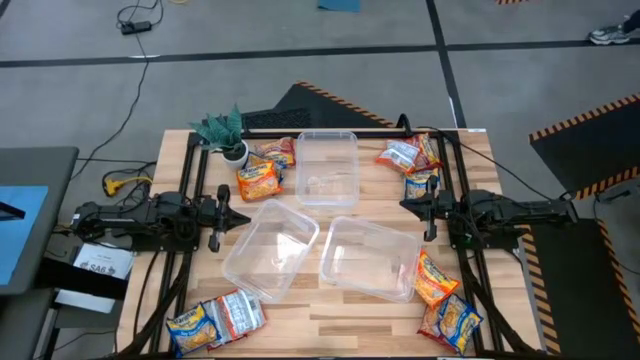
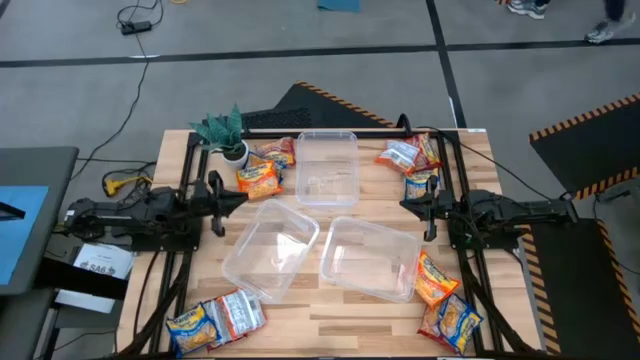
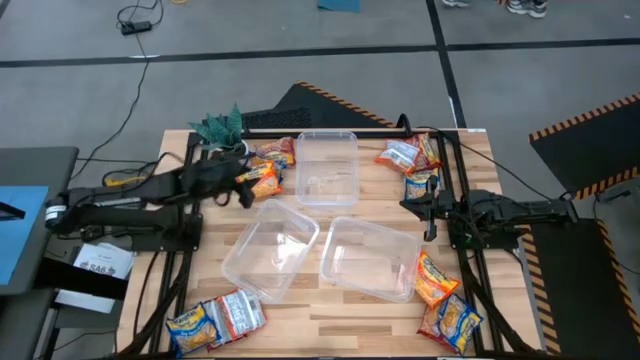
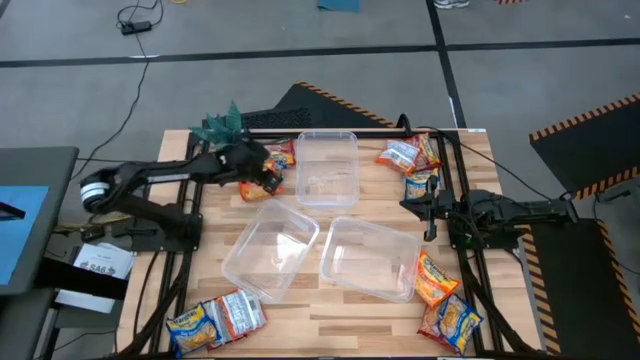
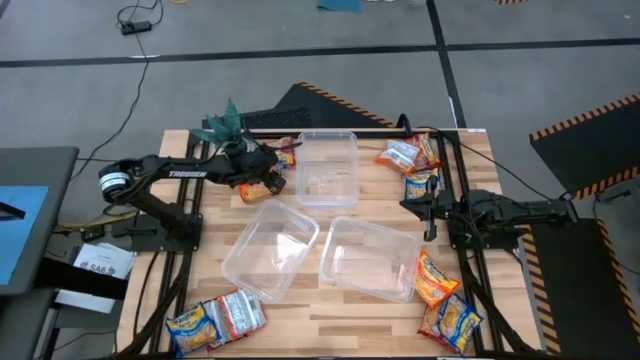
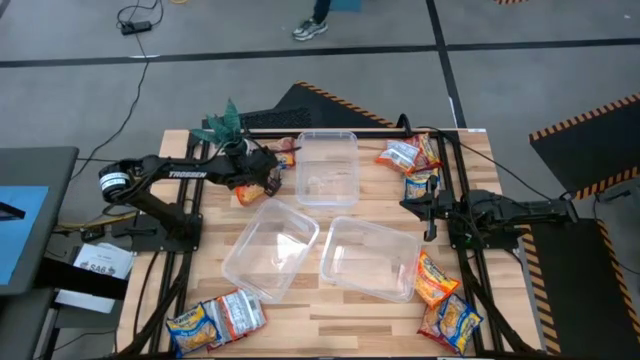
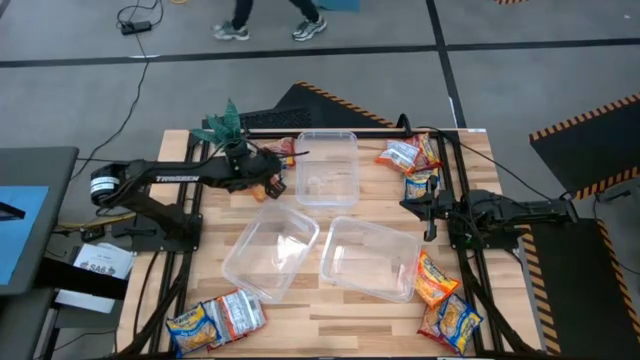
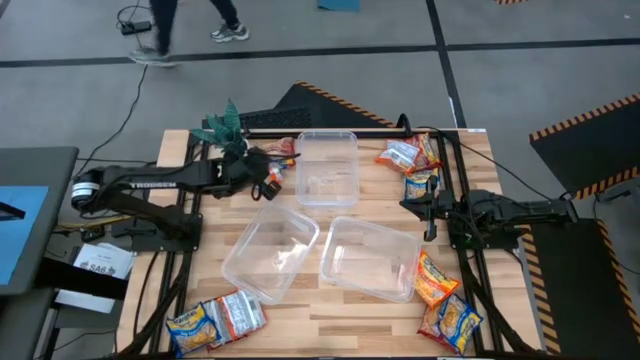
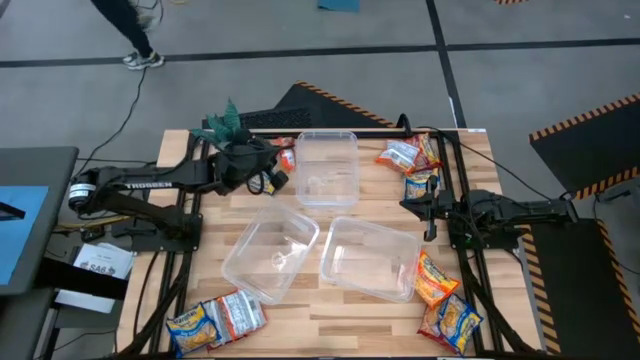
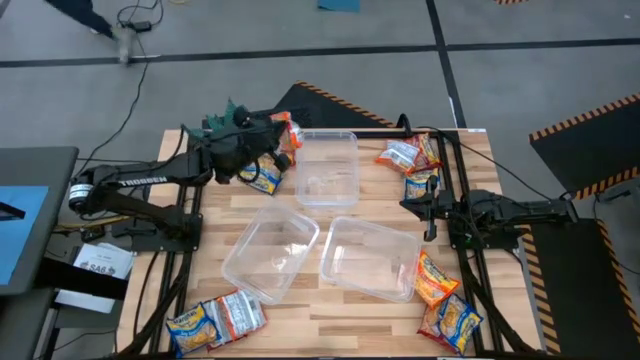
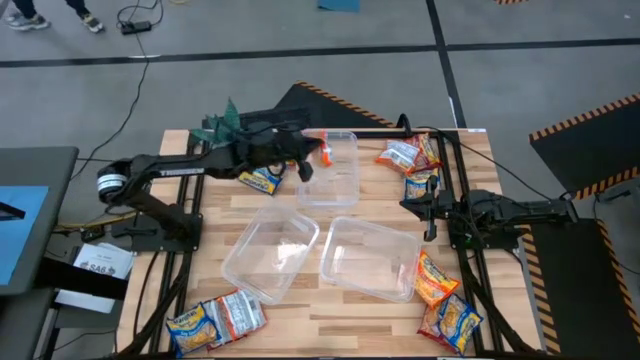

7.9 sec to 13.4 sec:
Task: Sort Maruchan noodles
Put the orange noodle pack into the top transparent bin

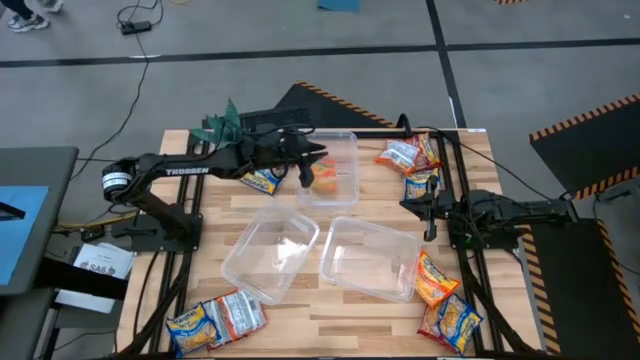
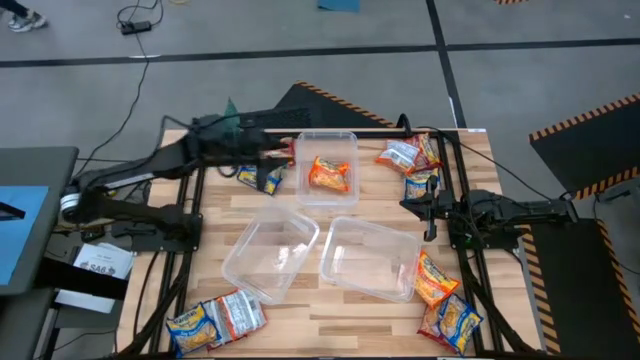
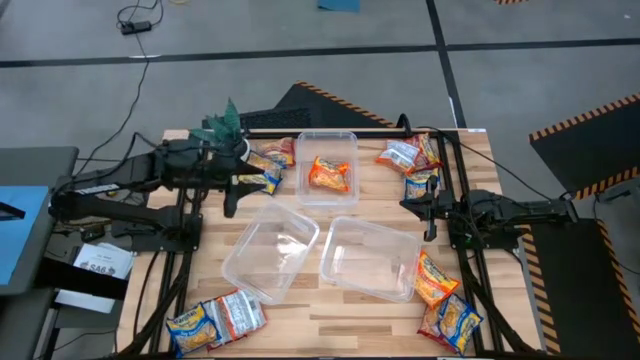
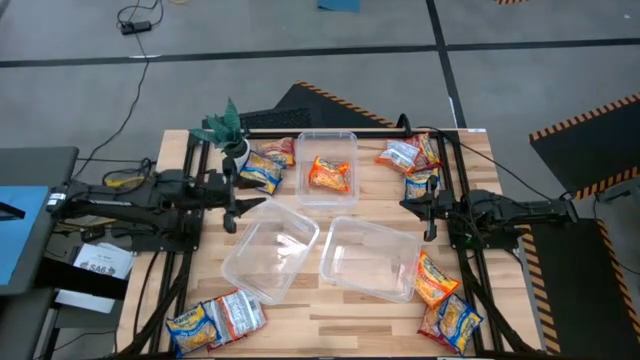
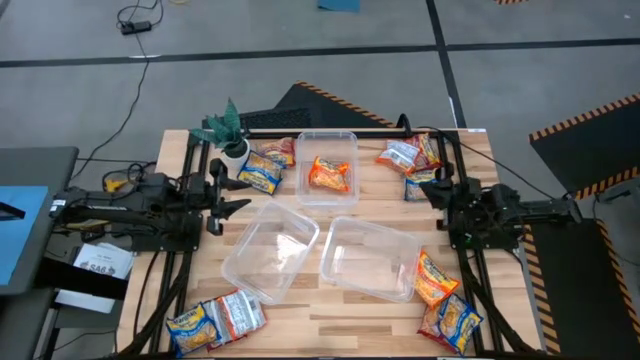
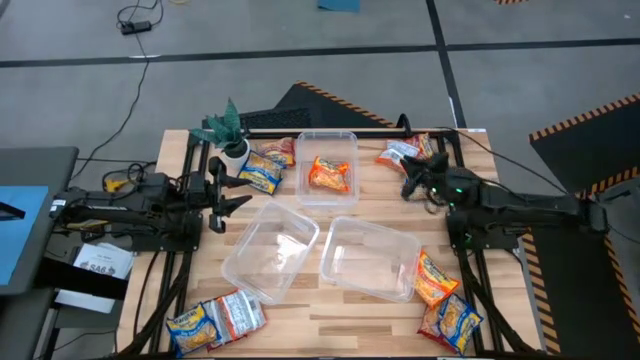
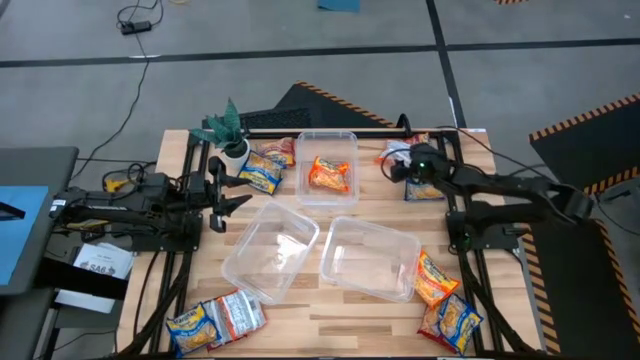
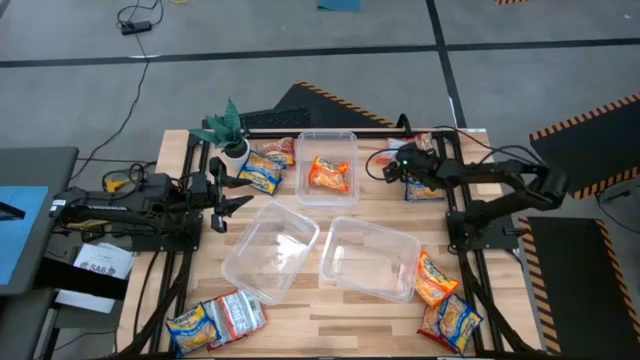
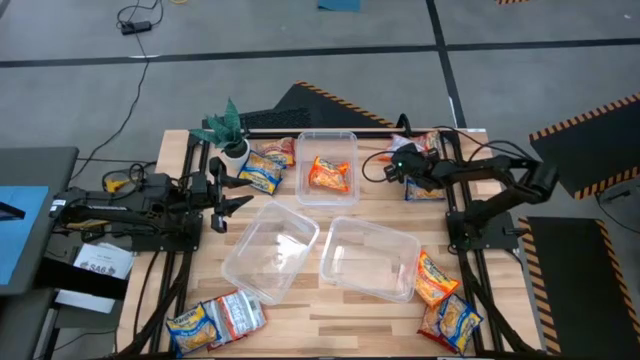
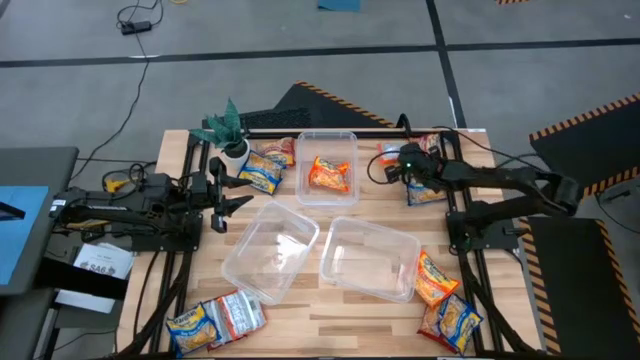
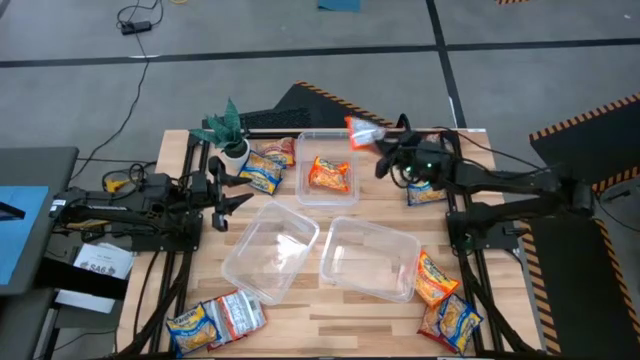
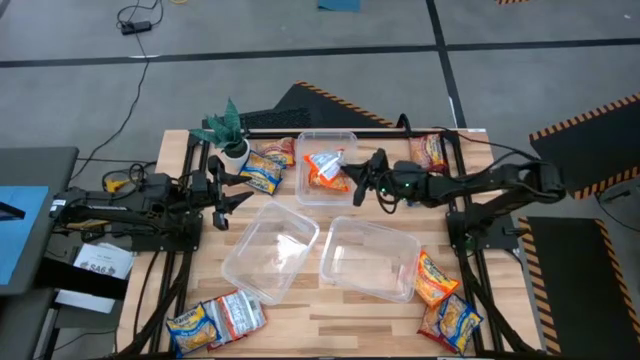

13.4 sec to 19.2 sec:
Put the orange noodle pack into the top transparent bin

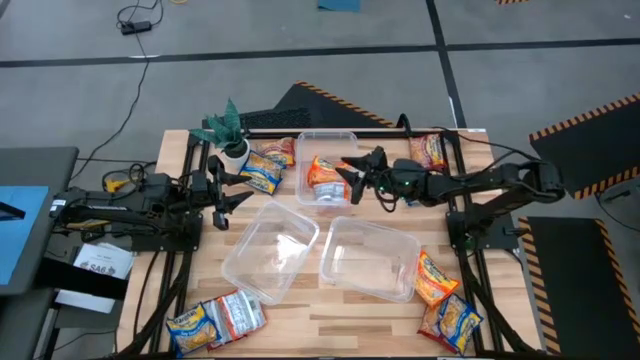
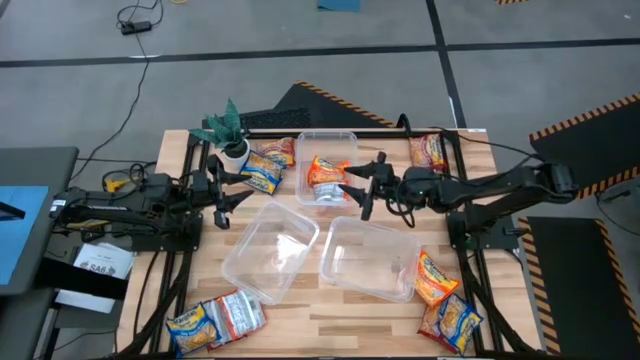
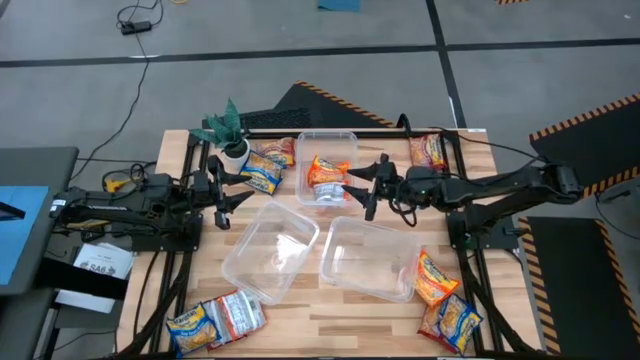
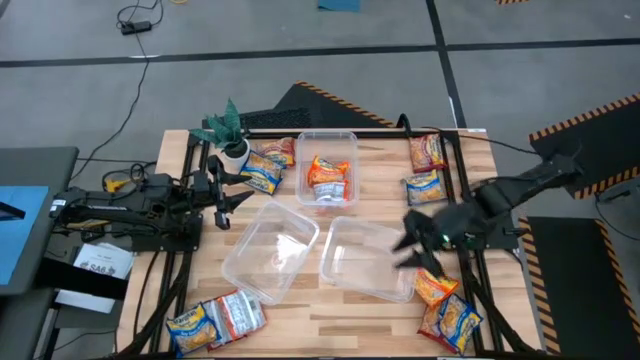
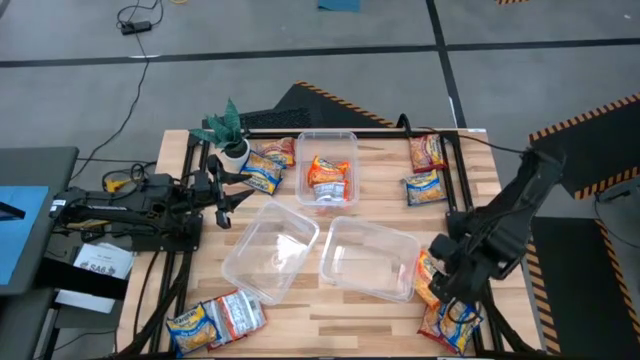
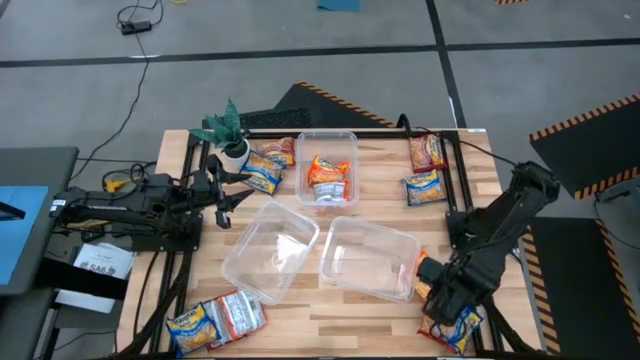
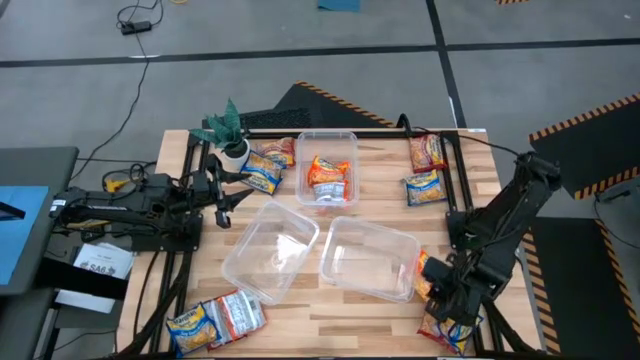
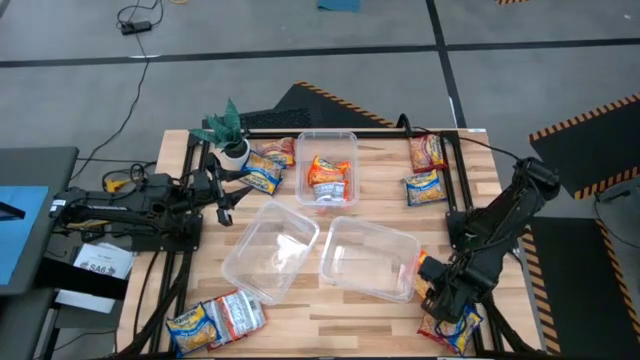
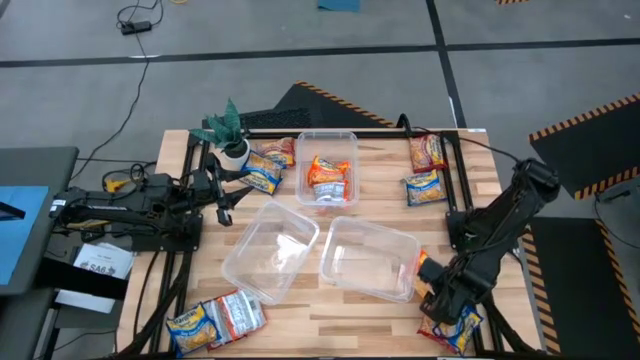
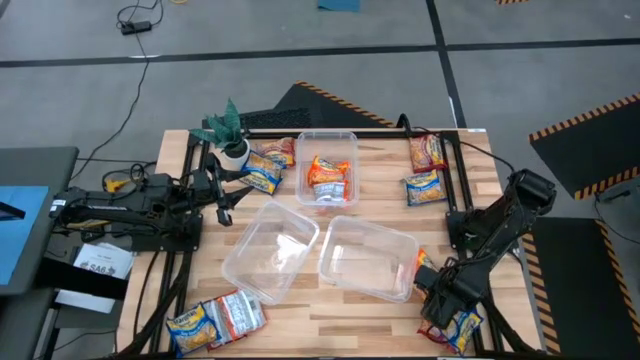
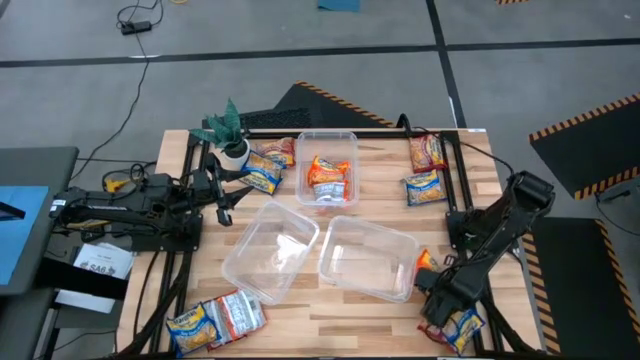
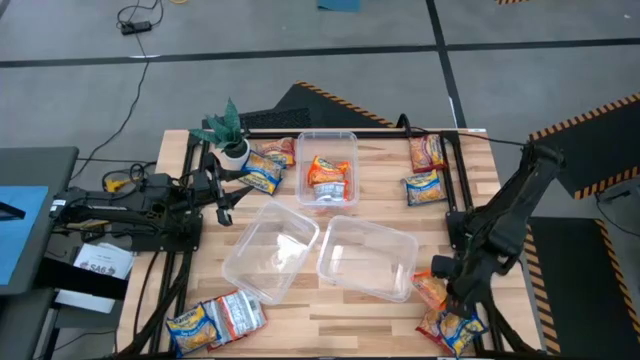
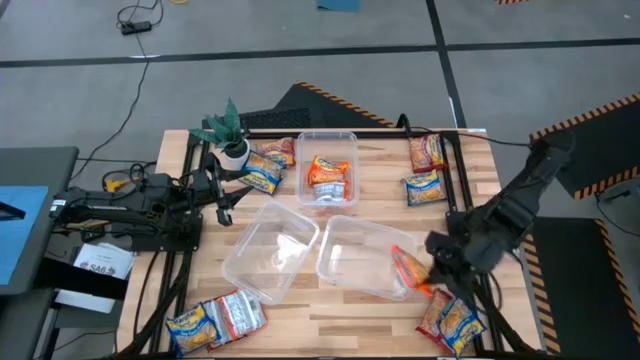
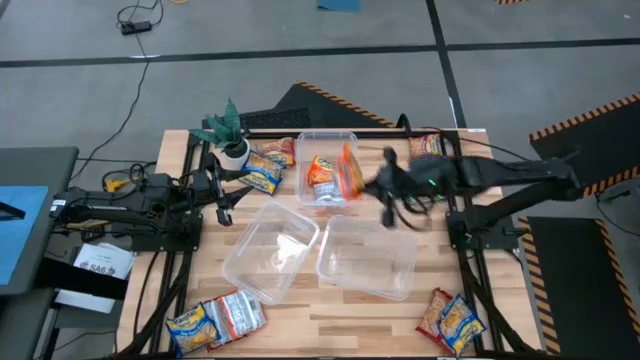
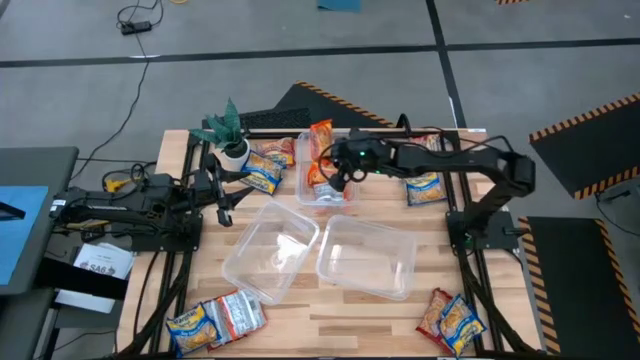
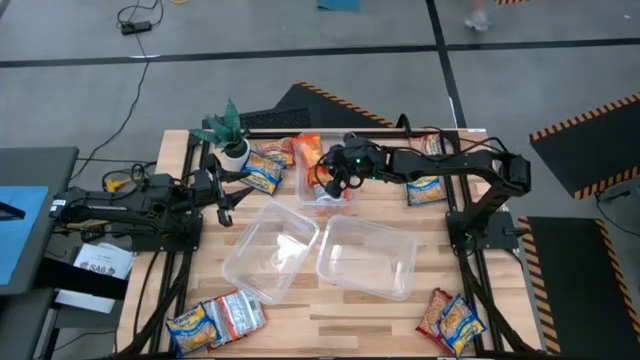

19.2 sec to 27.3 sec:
Put the noodle pack into the top transparent bin

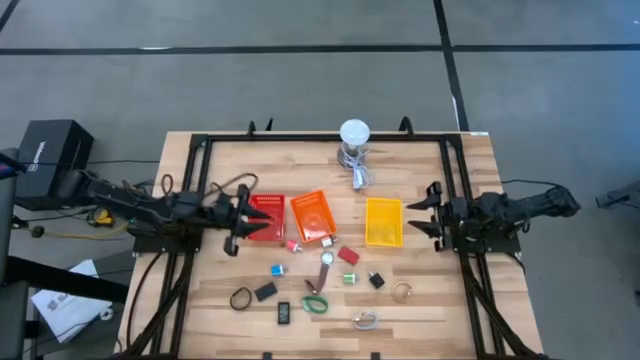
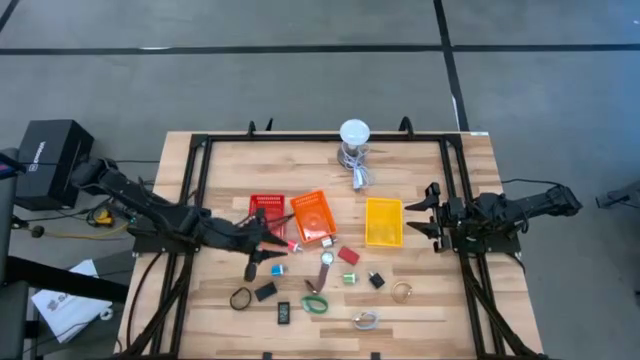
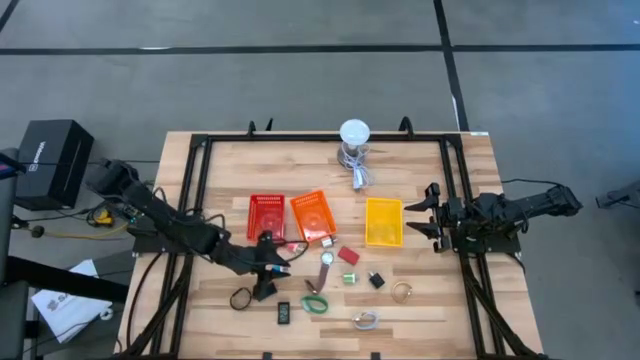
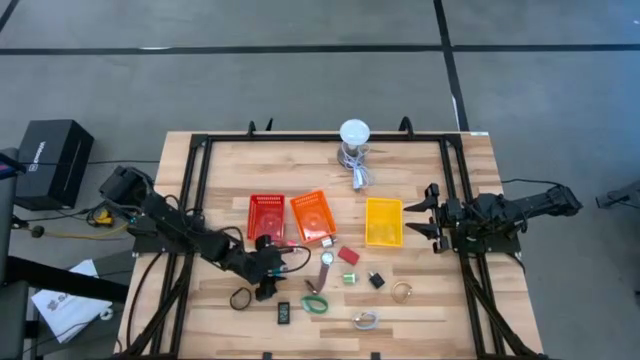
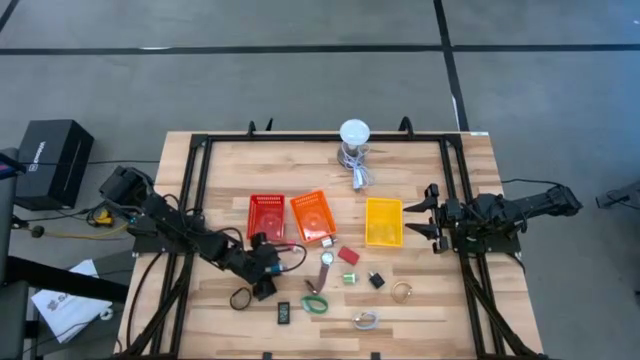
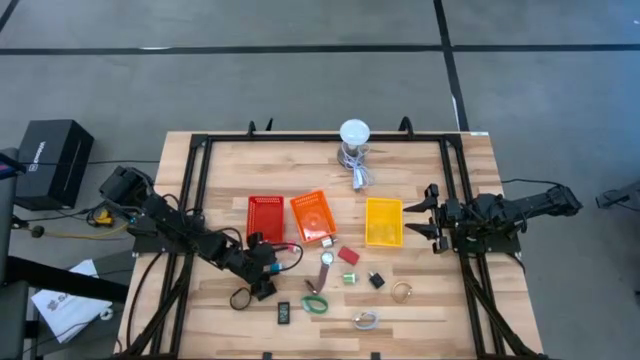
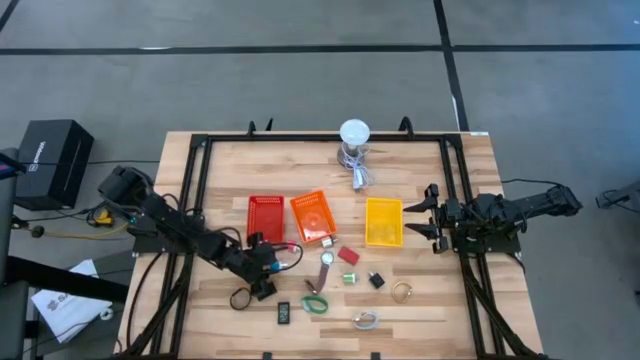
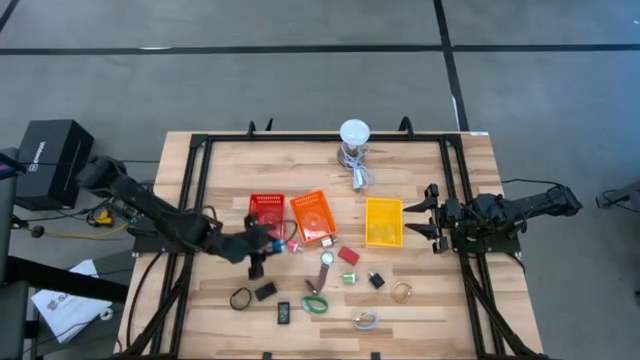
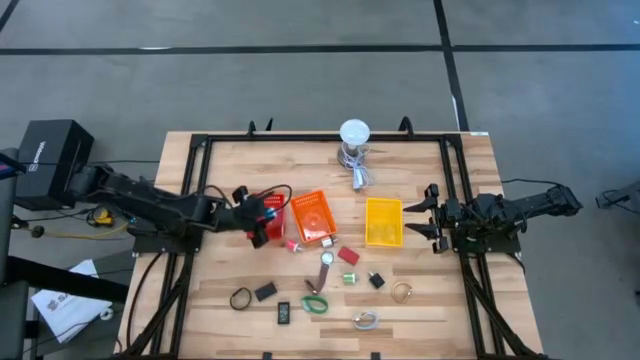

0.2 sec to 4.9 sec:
Task: Pick & Place Office items
Put the blue charger adapter into the red bin
